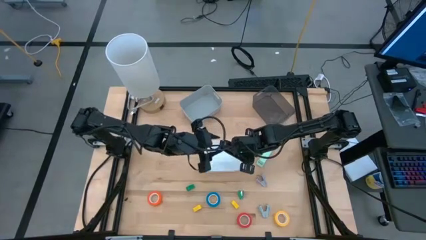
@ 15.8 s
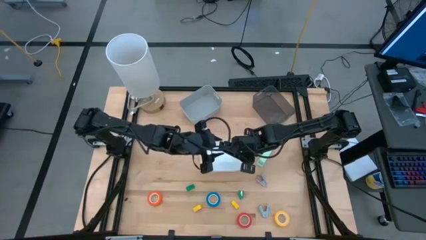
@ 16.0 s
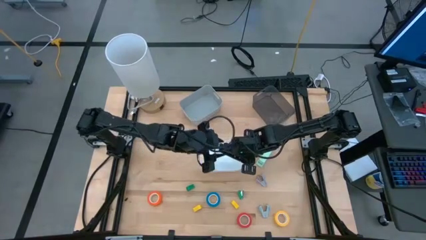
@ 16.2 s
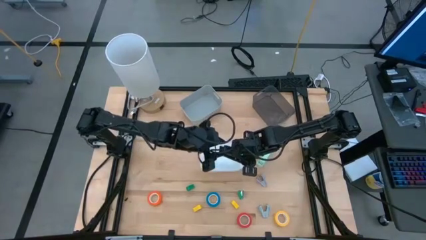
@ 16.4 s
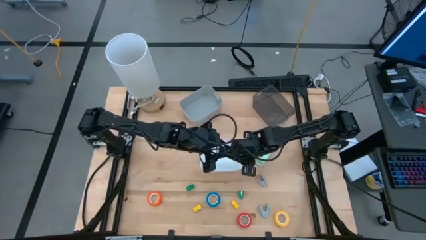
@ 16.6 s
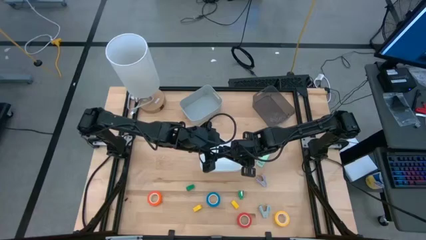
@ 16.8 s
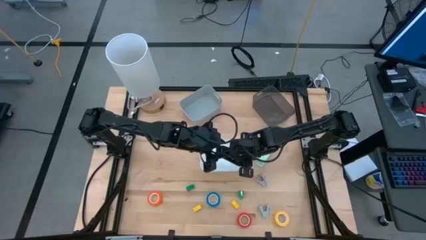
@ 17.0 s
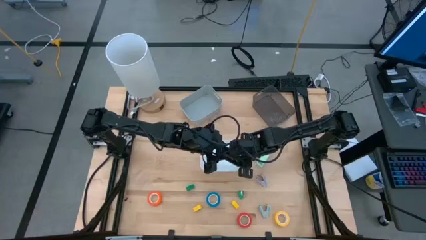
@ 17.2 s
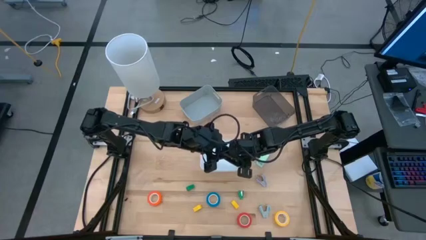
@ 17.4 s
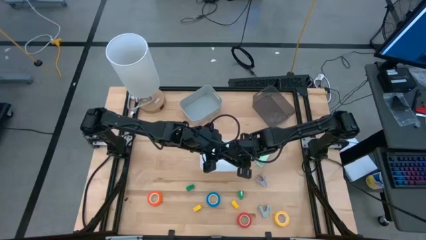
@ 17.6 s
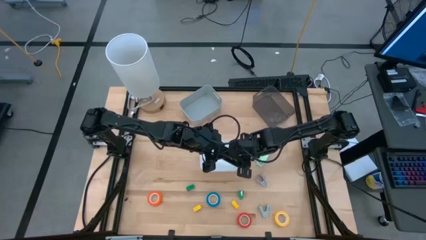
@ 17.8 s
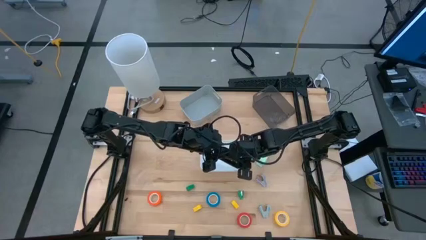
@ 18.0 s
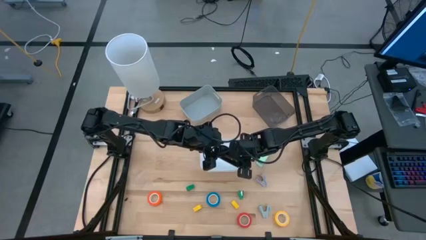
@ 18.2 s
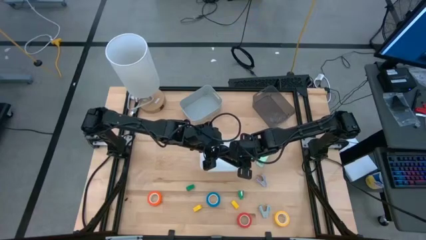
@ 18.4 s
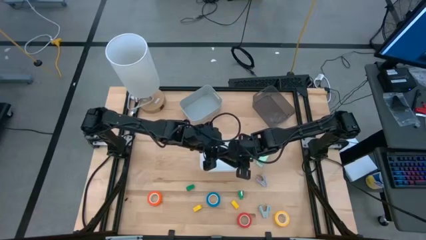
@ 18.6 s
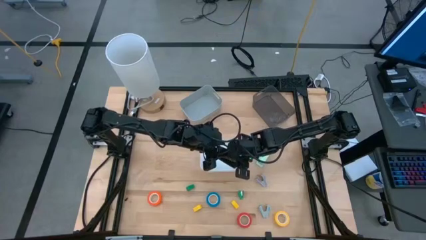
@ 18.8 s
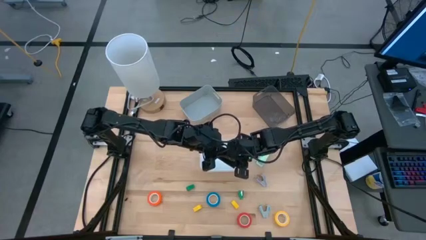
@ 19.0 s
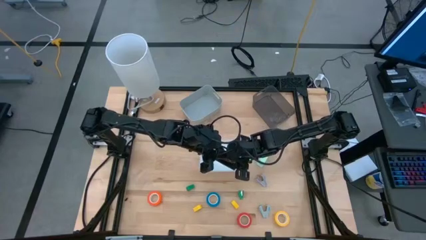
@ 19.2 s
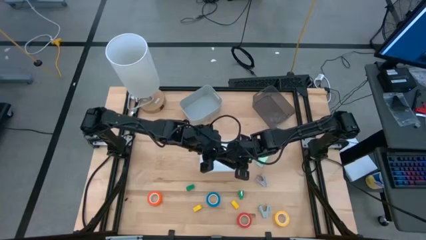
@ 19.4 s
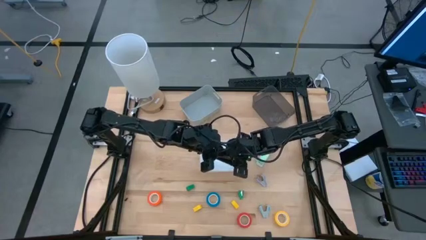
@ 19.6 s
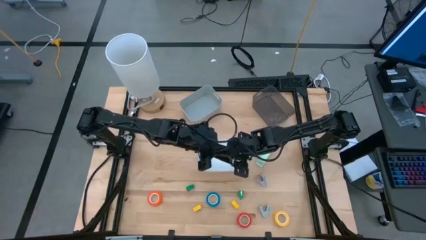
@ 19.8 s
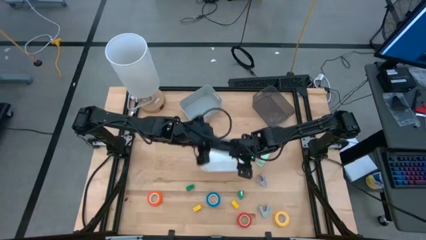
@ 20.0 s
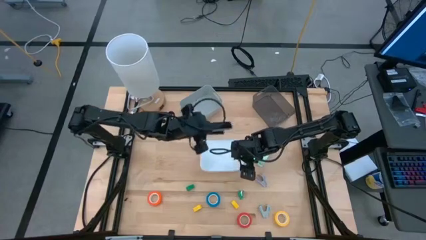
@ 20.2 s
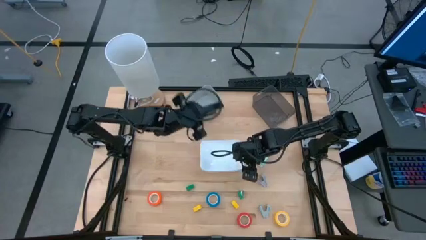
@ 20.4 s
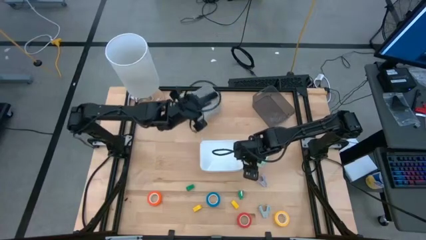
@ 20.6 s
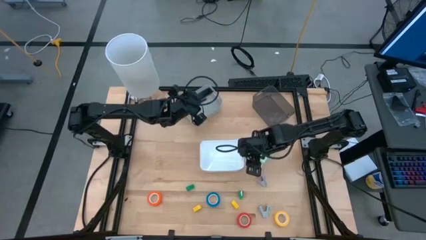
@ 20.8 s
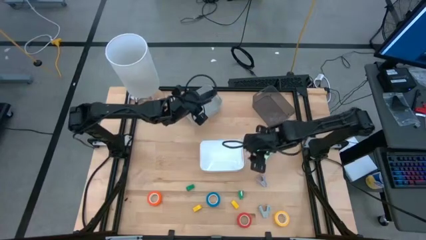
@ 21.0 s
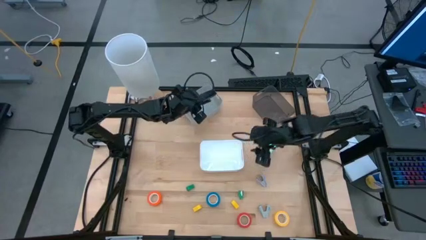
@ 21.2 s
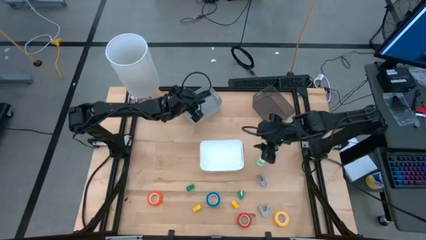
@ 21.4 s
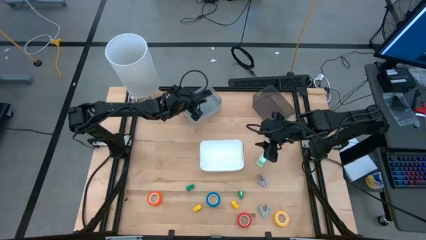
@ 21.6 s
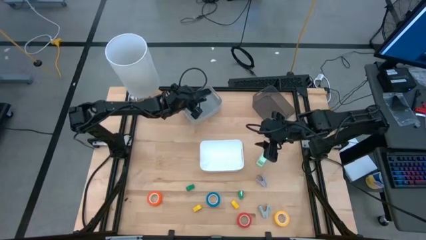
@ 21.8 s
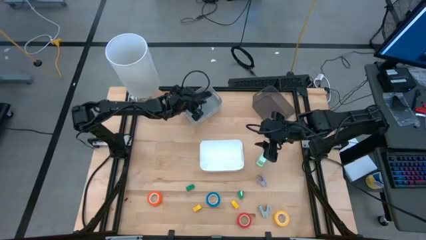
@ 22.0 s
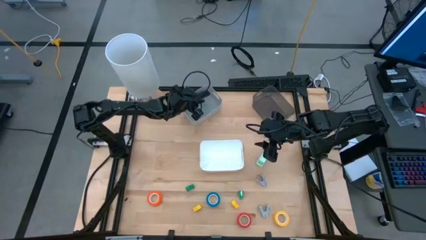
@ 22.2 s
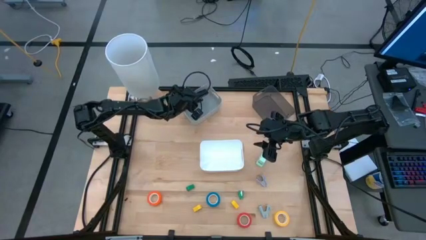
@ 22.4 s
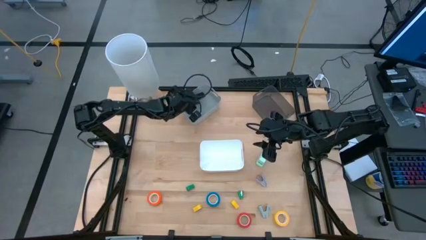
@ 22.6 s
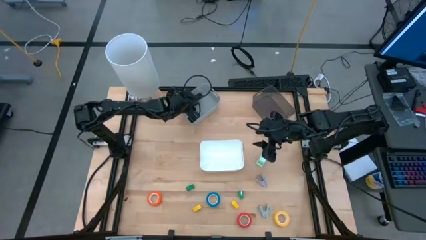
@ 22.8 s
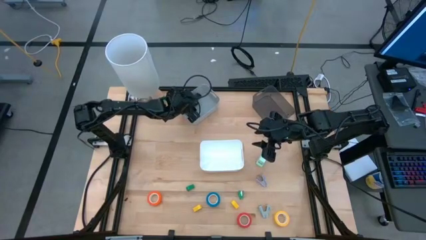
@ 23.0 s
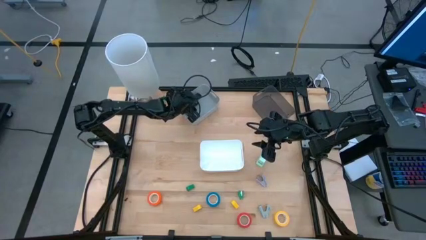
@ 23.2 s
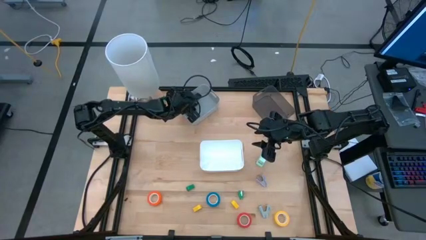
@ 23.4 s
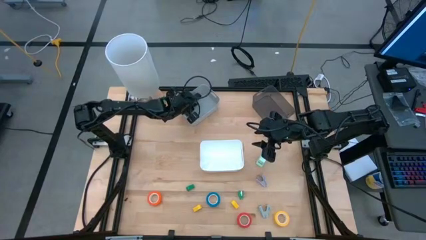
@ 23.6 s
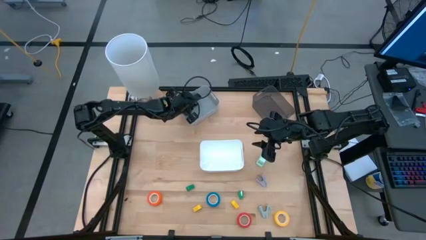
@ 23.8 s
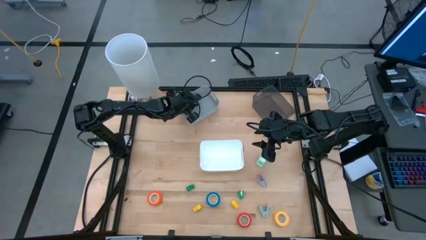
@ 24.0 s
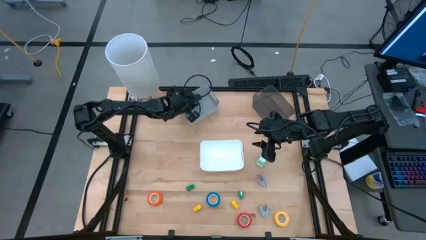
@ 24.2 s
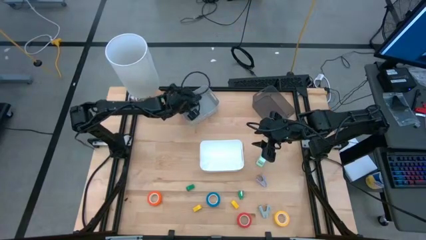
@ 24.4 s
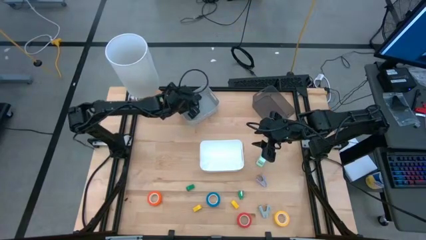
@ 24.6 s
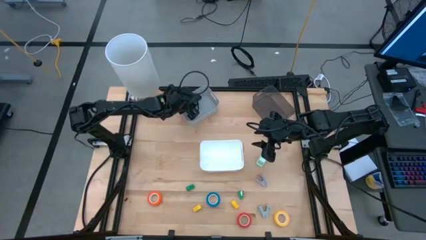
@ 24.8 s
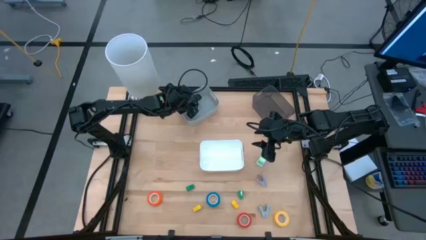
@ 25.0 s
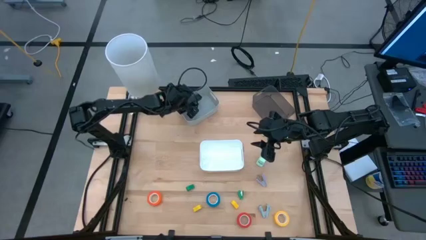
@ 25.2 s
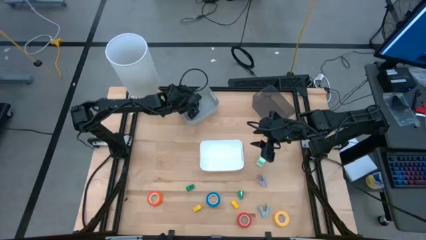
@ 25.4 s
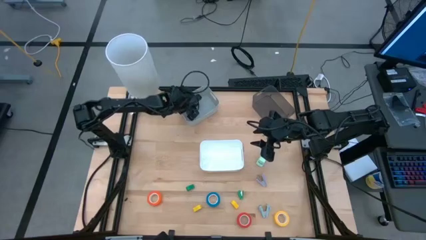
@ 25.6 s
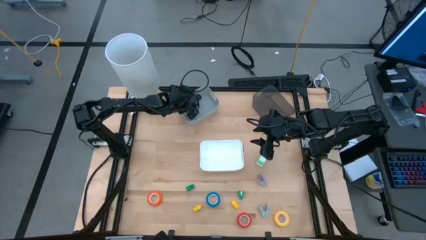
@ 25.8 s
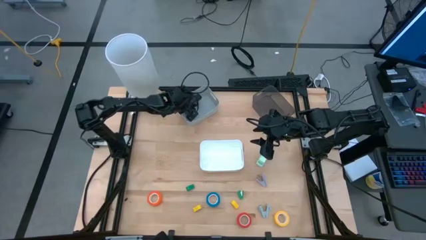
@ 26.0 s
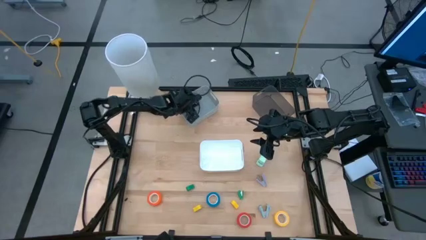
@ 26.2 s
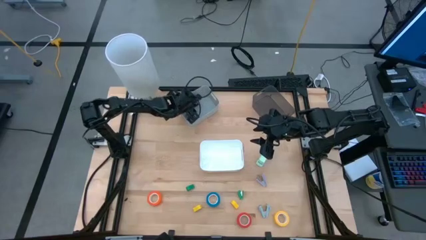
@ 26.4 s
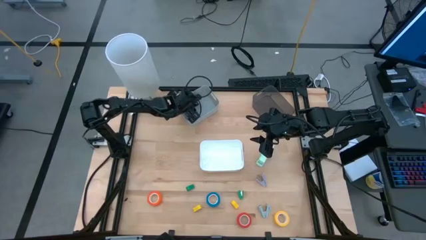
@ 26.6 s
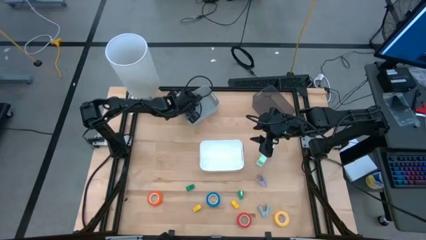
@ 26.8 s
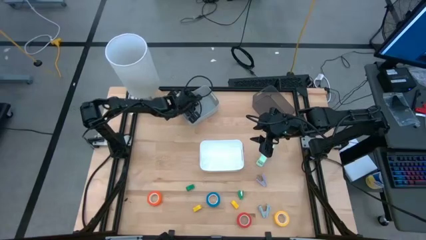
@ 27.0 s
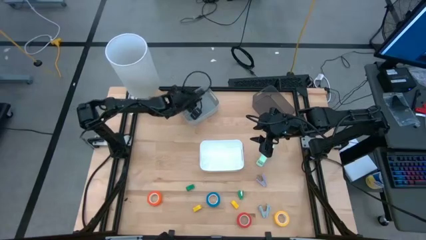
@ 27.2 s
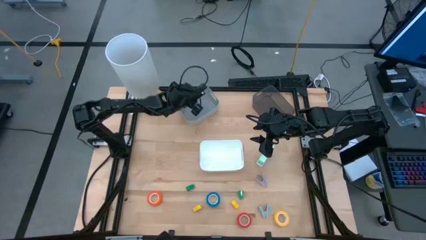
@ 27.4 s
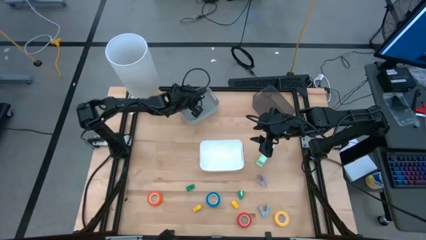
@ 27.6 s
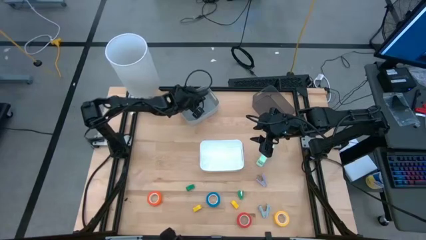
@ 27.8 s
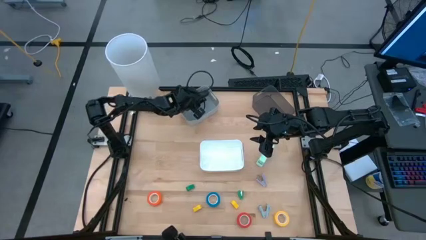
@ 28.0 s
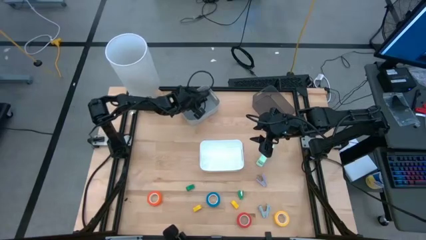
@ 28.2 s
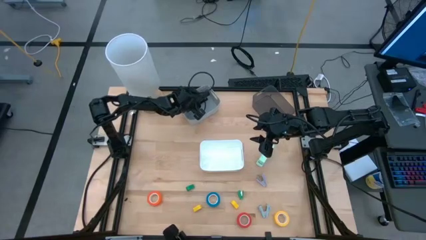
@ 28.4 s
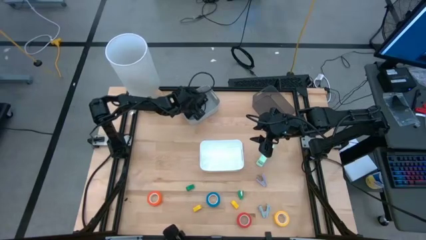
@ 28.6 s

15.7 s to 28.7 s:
Task: Pick and place Stapler, Stapler remover, tape
Put the black stapler into the gray bin
